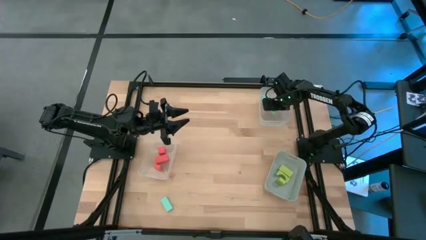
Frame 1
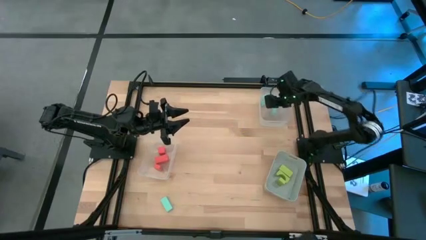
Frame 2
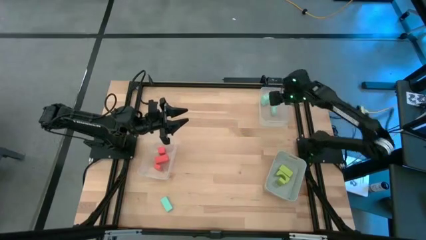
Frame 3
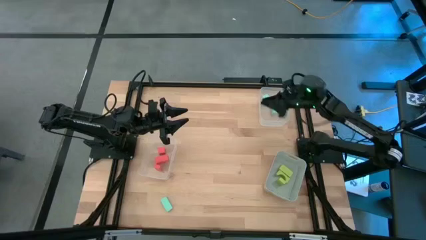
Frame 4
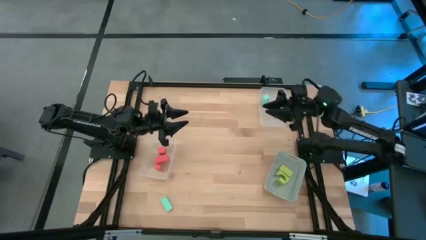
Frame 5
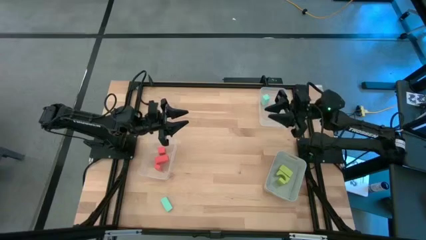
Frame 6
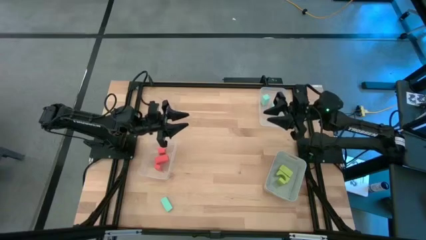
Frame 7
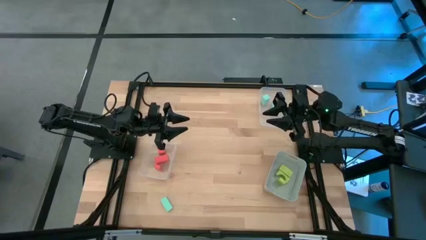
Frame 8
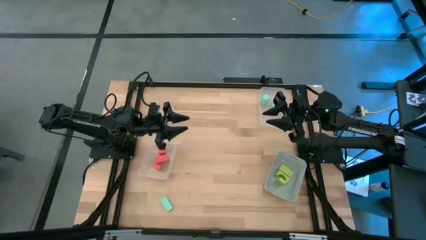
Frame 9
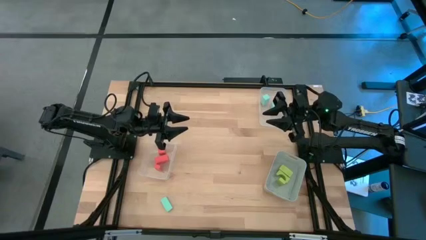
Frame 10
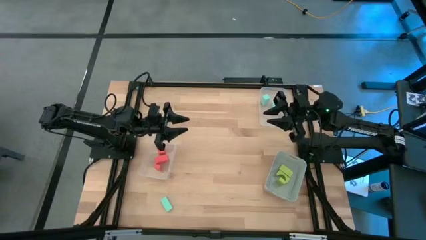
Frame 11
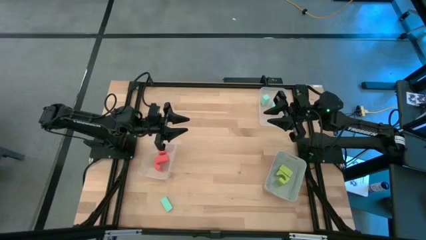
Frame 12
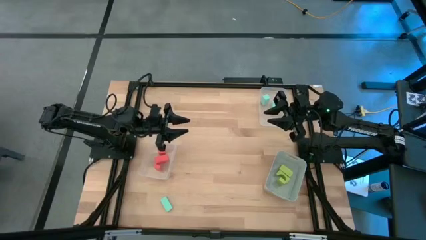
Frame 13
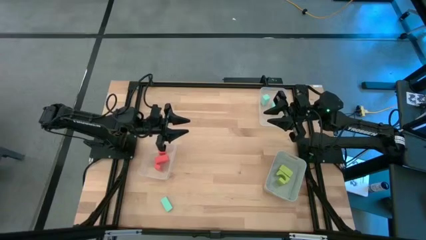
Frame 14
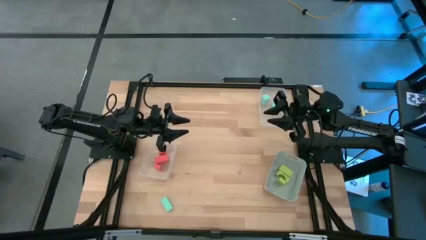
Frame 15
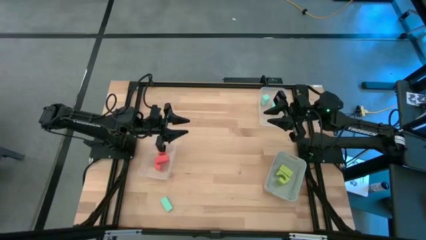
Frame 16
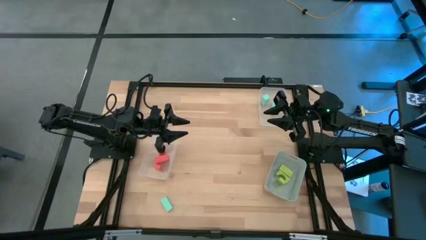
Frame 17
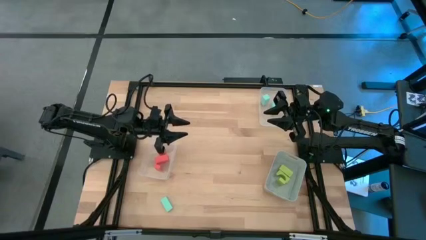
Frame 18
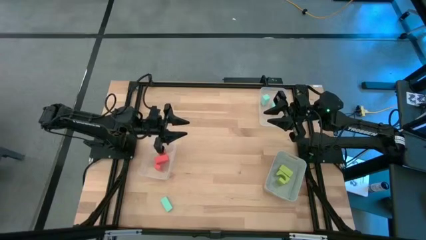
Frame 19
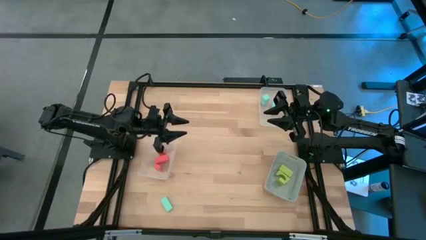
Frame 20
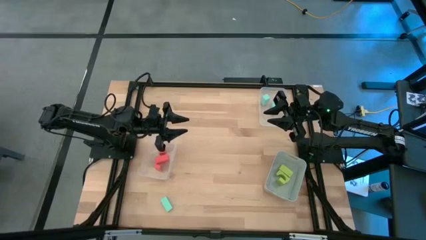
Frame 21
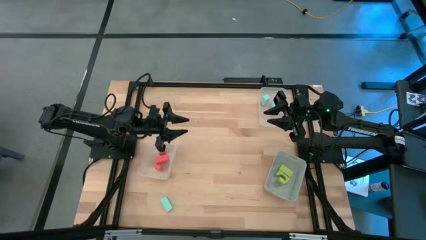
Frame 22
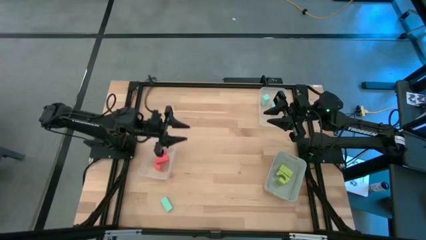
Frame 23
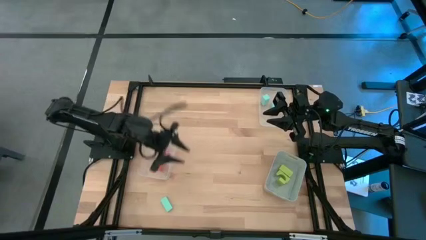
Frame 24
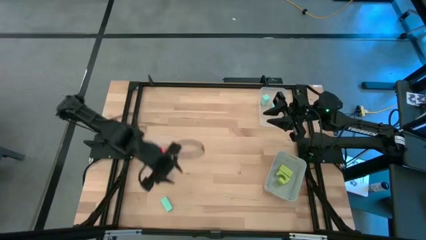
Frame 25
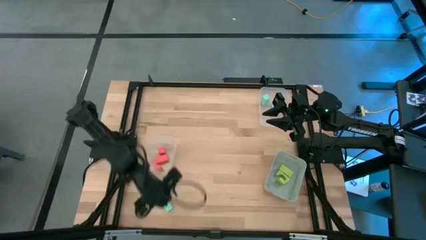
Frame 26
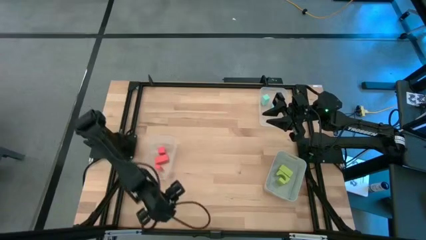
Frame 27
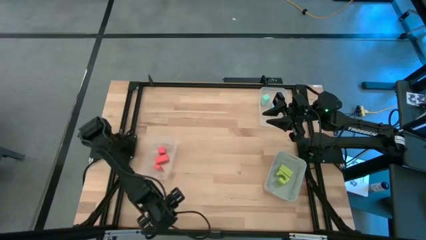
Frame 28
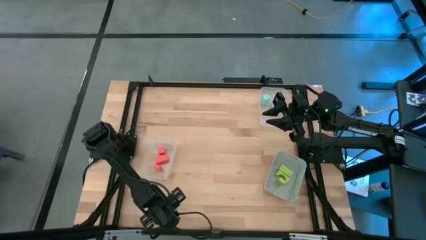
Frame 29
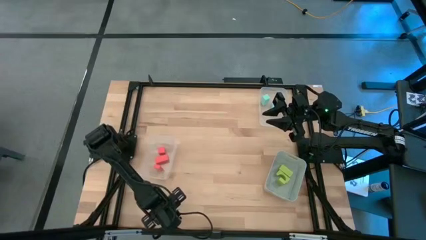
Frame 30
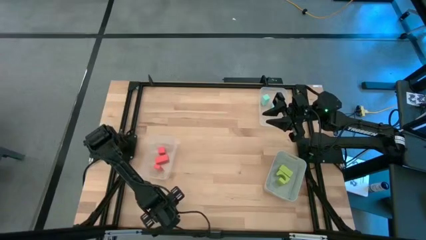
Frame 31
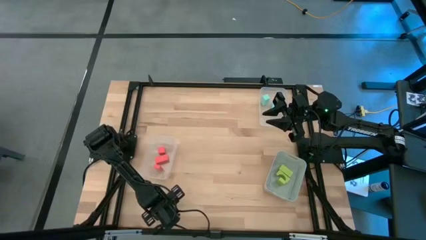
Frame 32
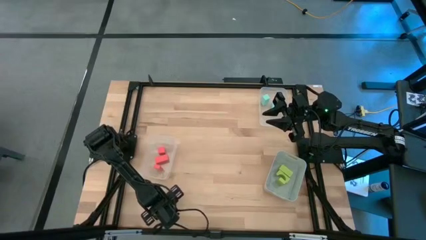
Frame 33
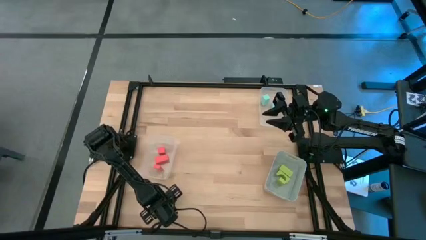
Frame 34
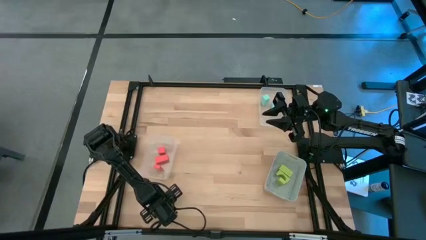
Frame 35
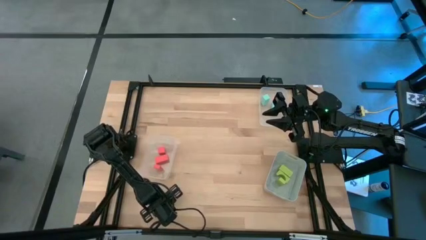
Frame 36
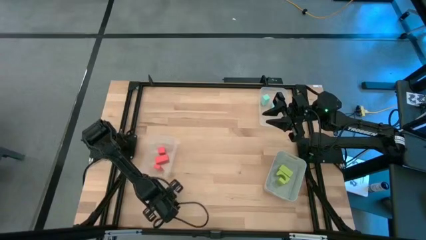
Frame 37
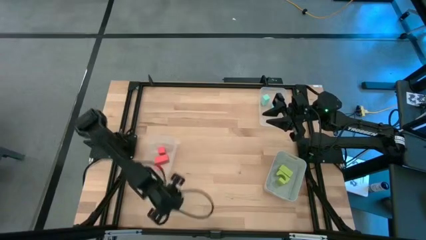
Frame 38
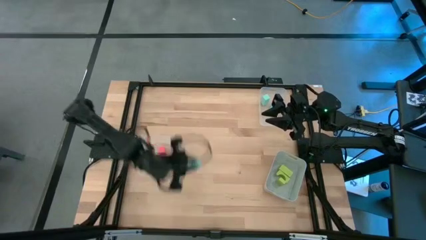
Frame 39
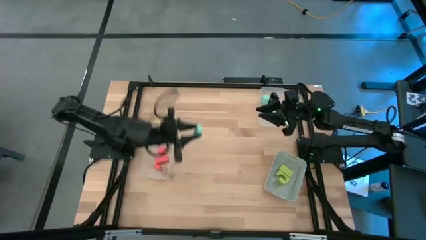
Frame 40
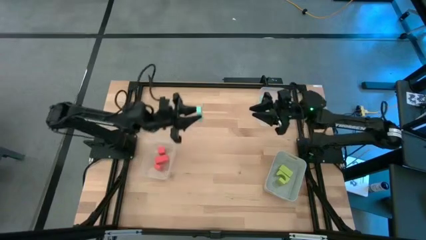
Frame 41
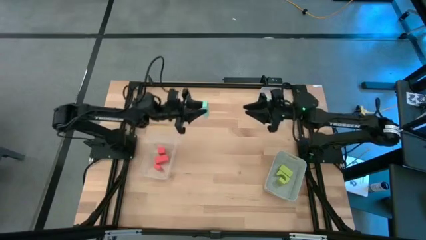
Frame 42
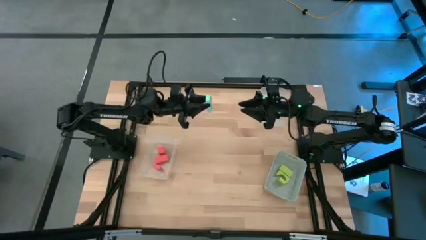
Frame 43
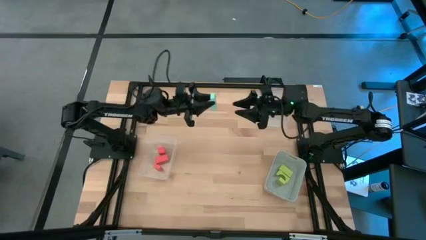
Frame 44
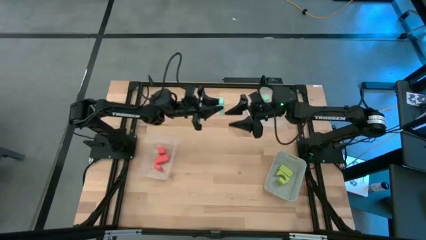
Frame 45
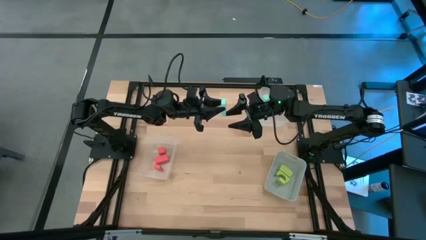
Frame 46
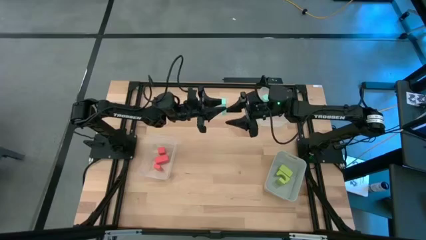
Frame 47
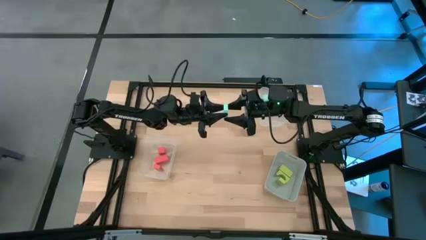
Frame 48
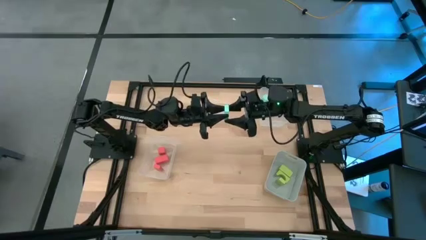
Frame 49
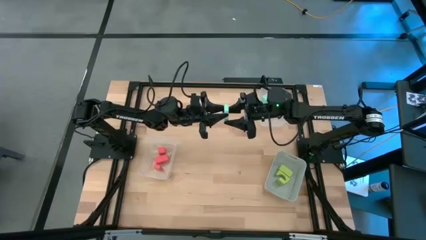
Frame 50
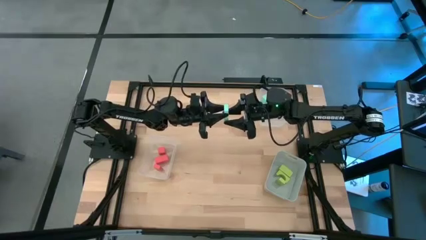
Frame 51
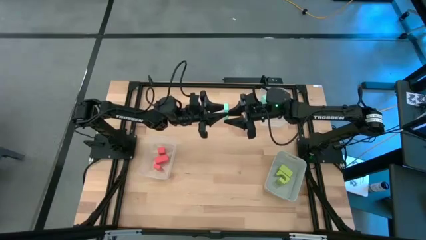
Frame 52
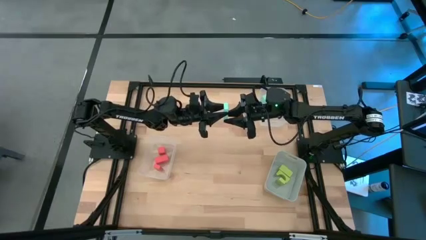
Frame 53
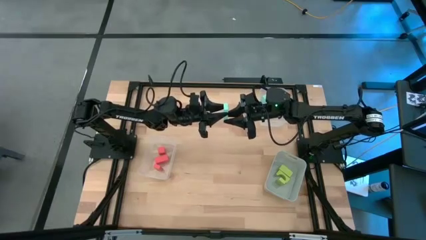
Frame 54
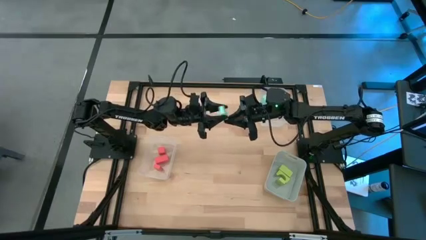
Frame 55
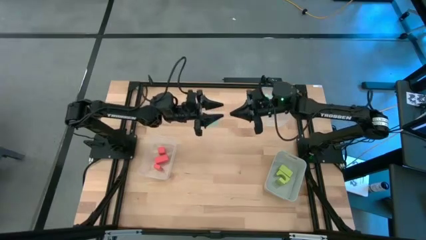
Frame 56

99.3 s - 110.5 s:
Task: Sort & place blocks by color
Put the light blue block into the top transparent bin

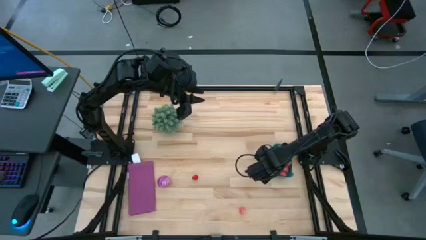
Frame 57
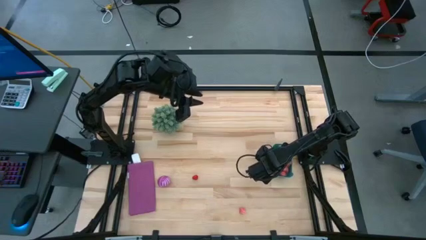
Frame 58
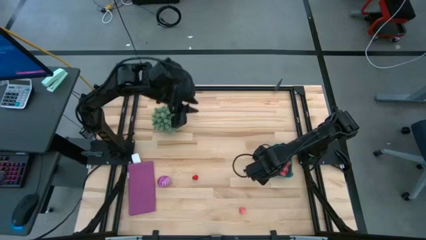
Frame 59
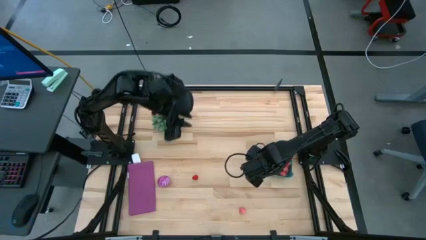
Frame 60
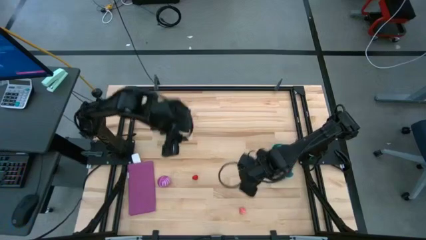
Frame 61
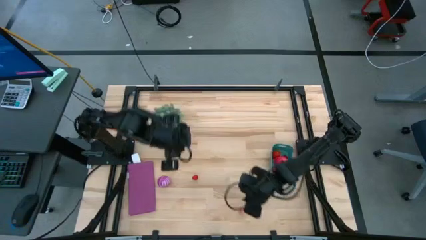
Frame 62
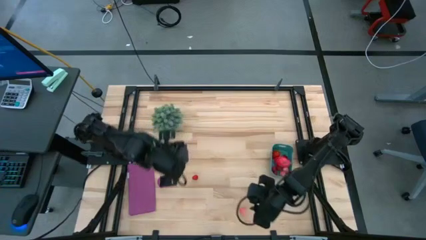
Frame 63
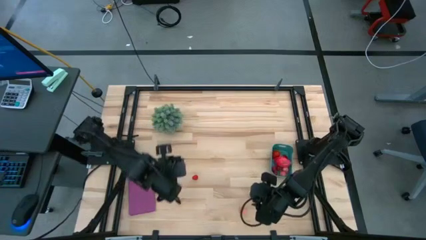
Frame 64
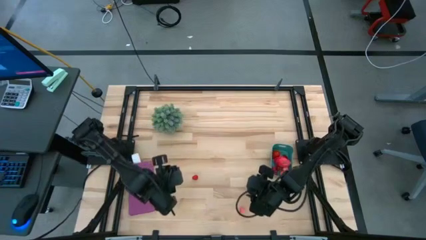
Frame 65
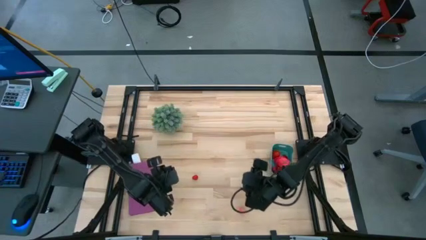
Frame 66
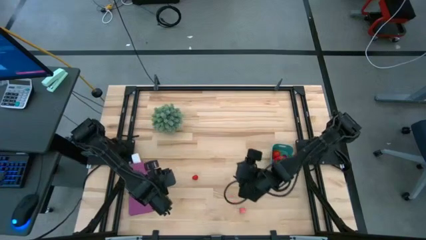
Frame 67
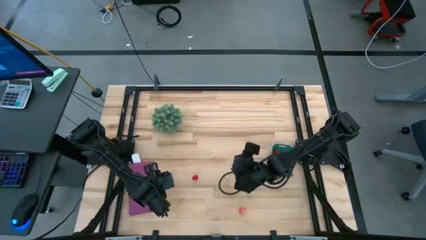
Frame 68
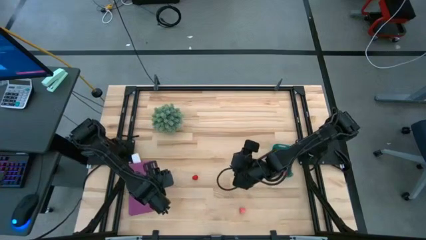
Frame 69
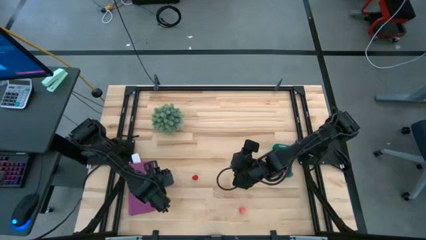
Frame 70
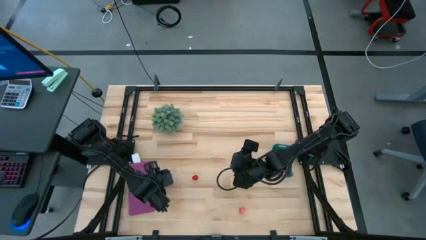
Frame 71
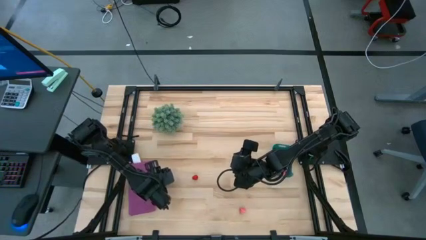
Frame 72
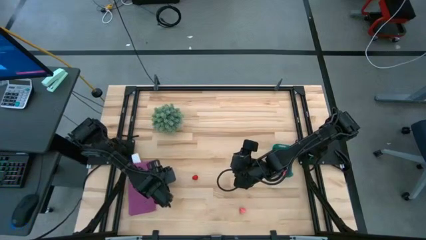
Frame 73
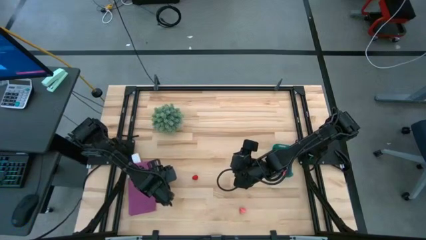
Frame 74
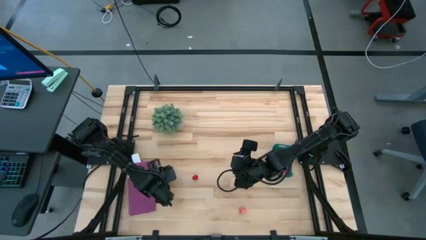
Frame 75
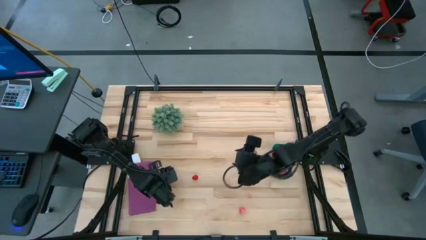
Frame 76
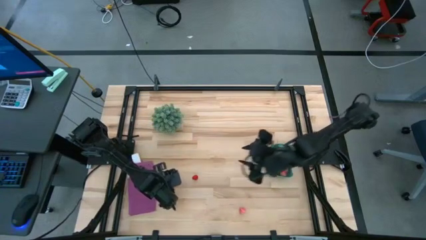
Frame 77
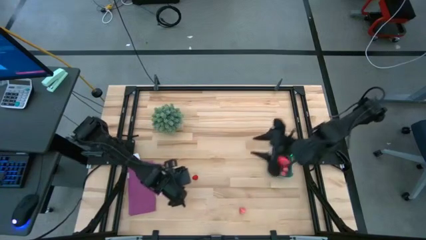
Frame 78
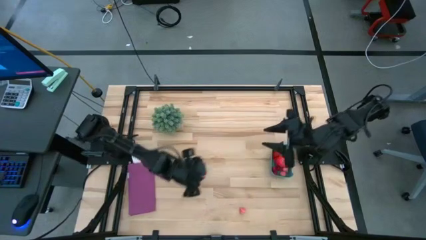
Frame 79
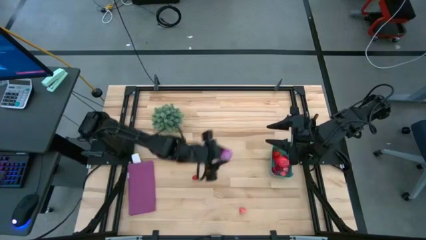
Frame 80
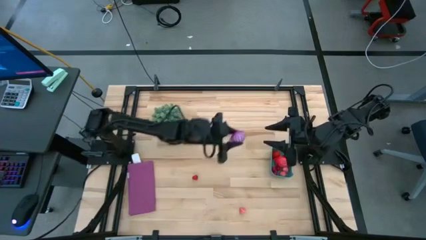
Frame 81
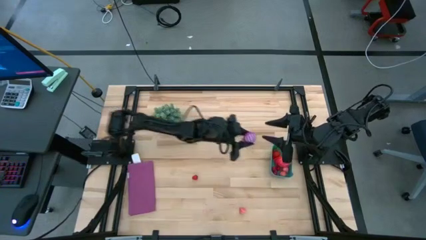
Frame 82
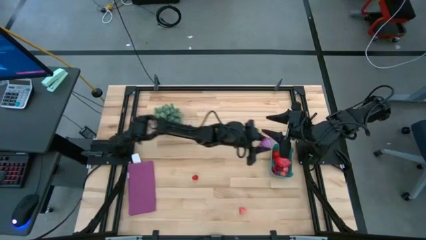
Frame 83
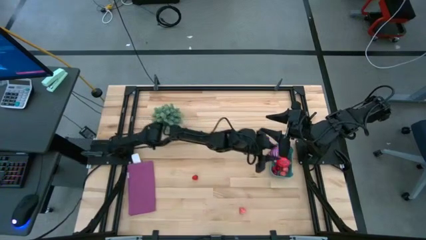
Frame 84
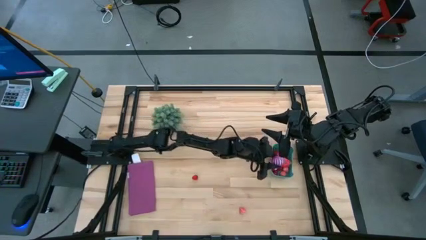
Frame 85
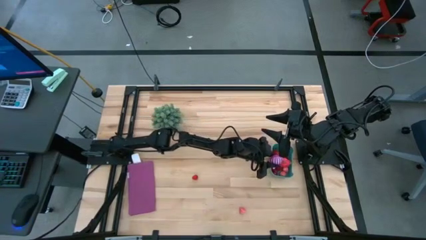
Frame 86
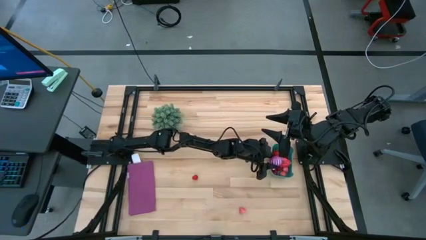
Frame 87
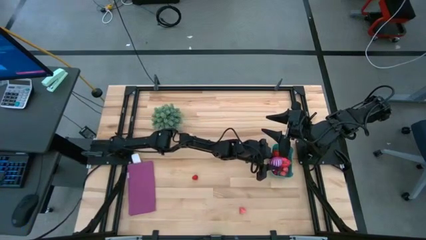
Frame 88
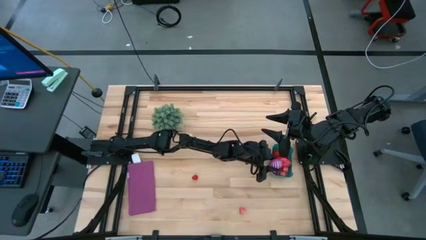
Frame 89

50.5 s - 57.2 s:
Task: Pick and placing Produce into tupperware
Put the purple onion into the green bin
